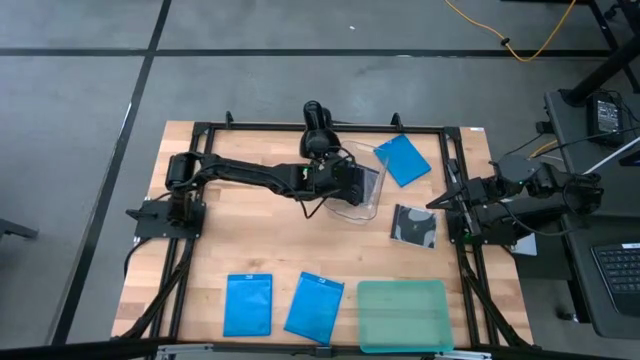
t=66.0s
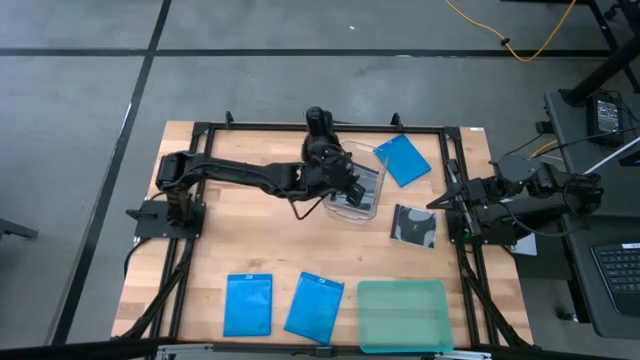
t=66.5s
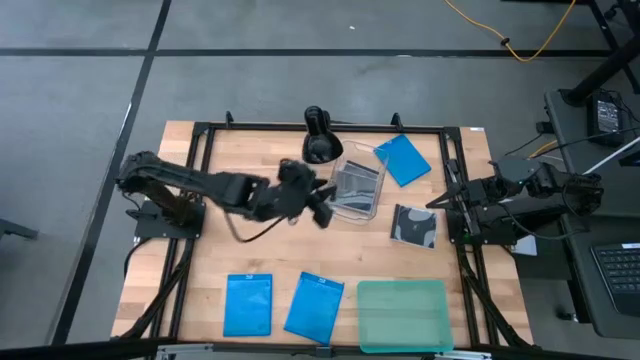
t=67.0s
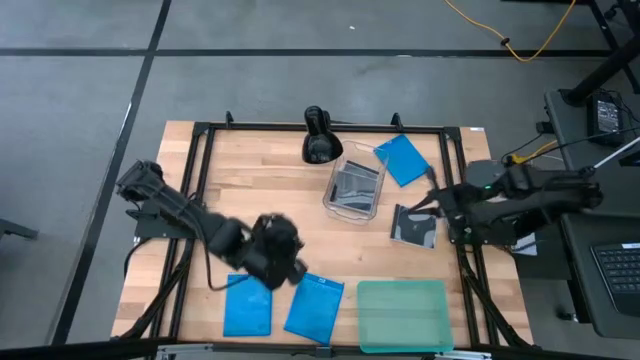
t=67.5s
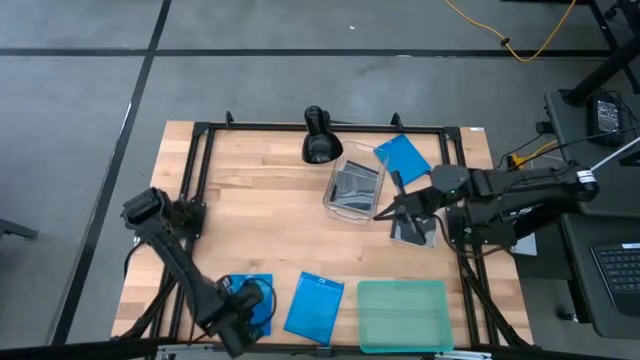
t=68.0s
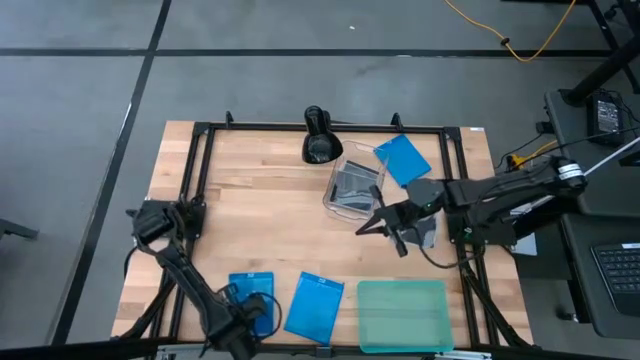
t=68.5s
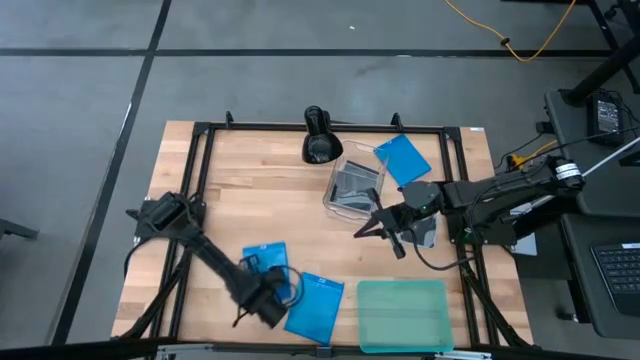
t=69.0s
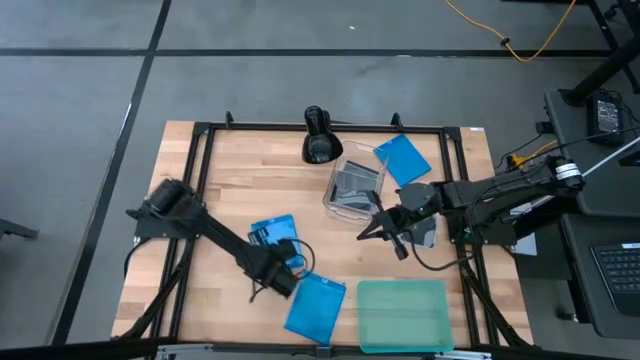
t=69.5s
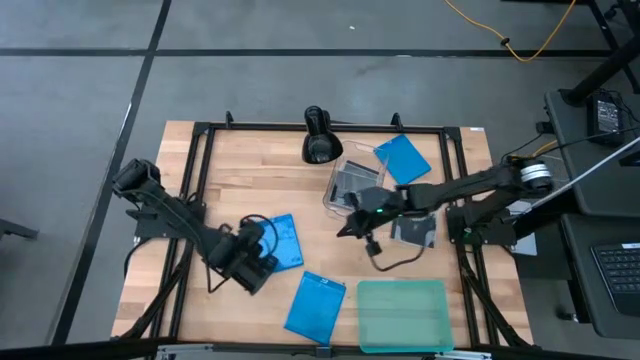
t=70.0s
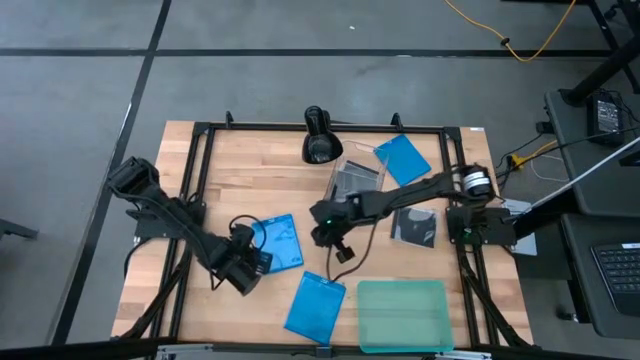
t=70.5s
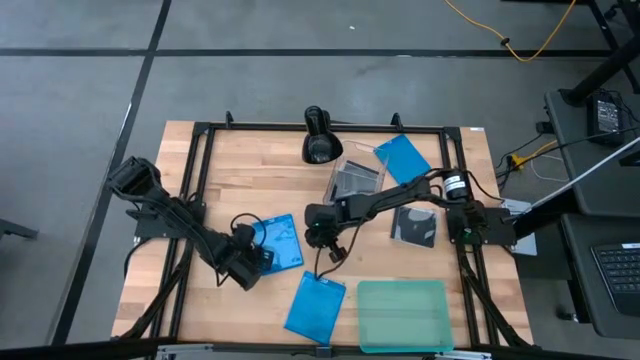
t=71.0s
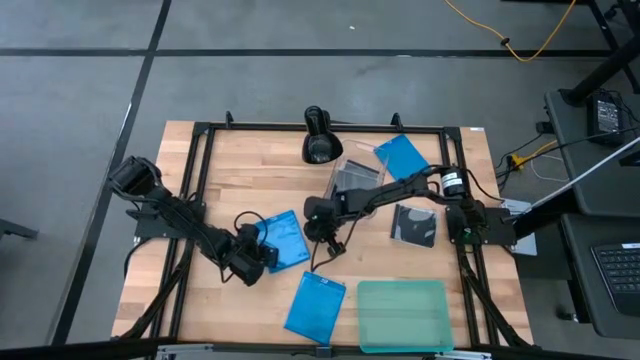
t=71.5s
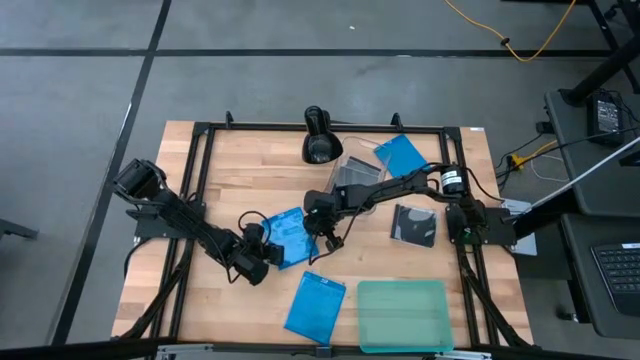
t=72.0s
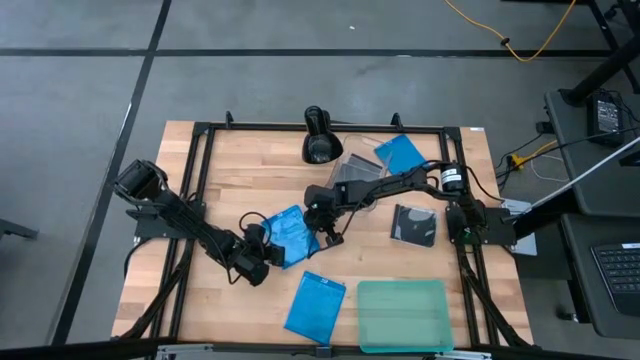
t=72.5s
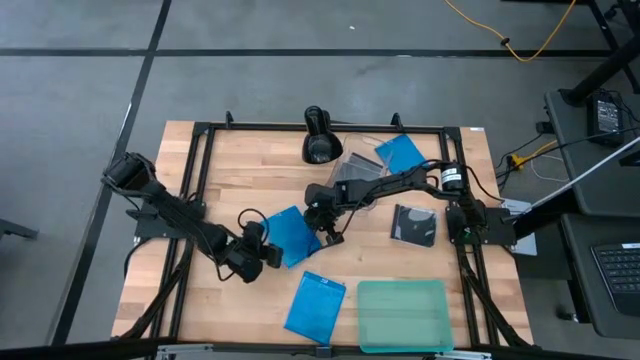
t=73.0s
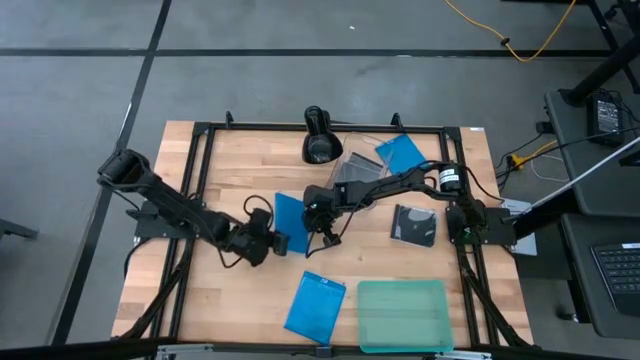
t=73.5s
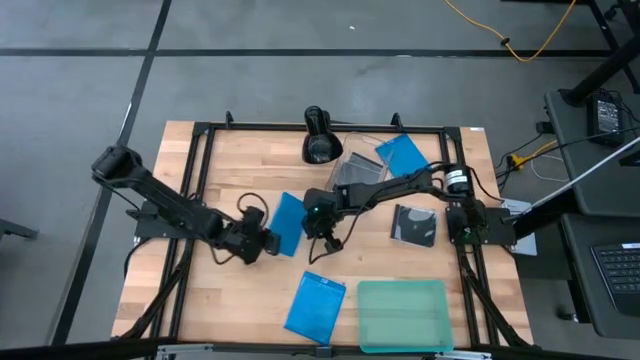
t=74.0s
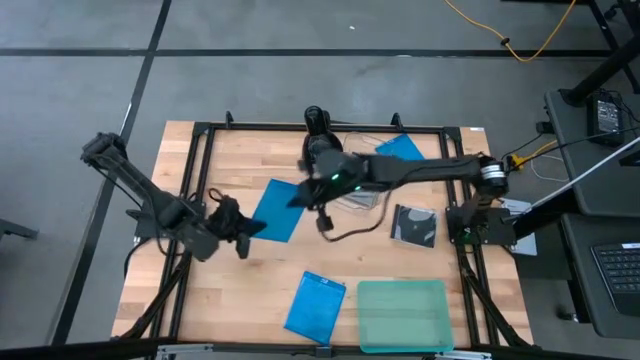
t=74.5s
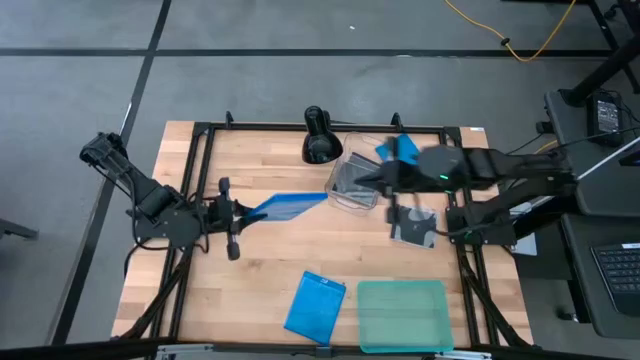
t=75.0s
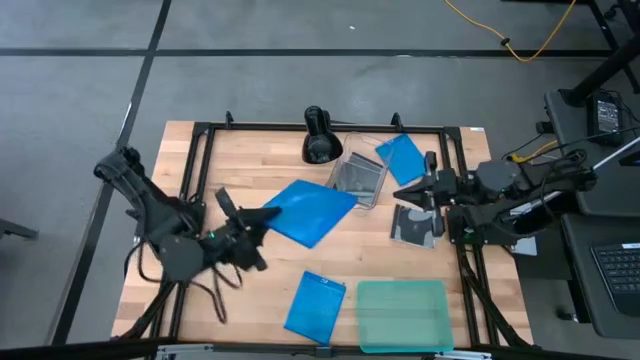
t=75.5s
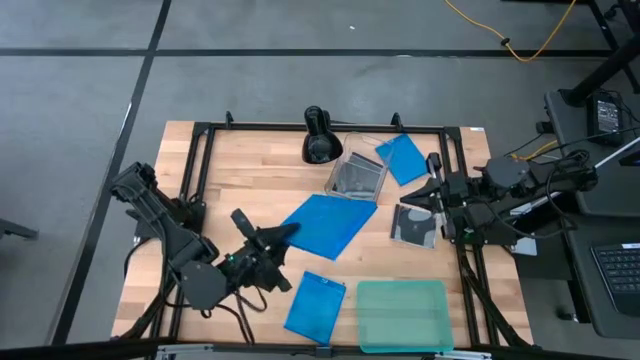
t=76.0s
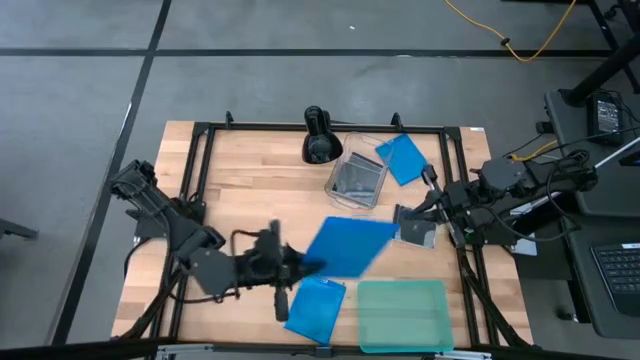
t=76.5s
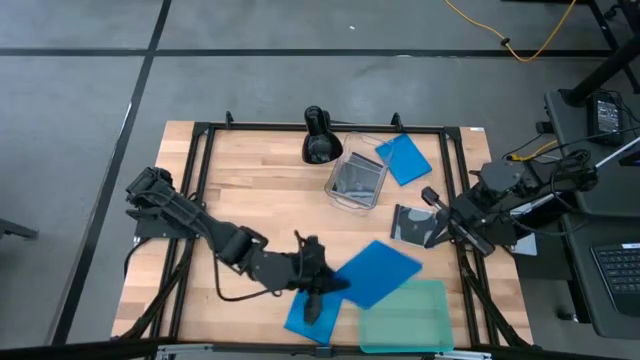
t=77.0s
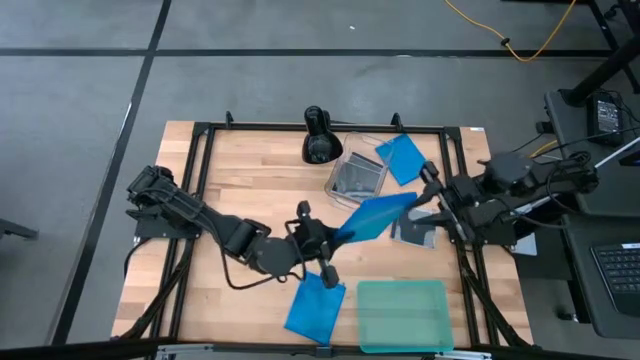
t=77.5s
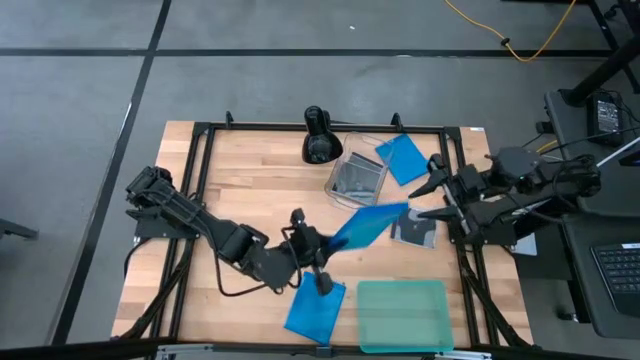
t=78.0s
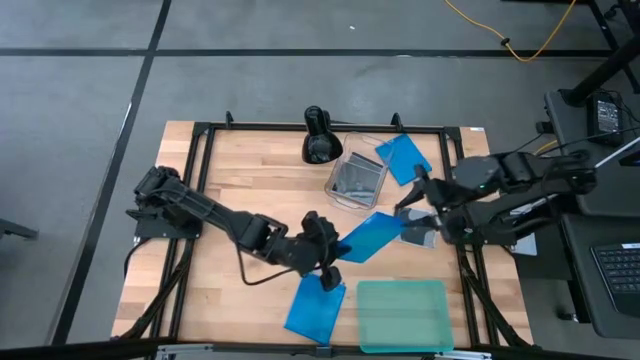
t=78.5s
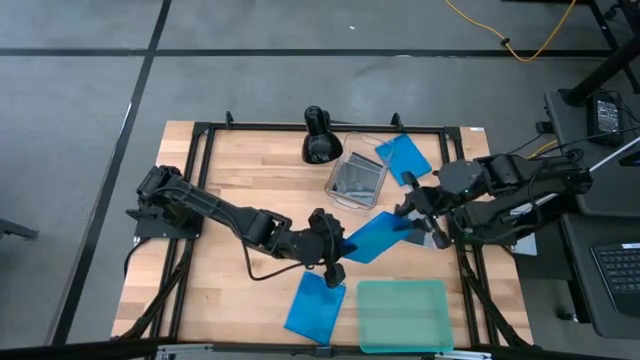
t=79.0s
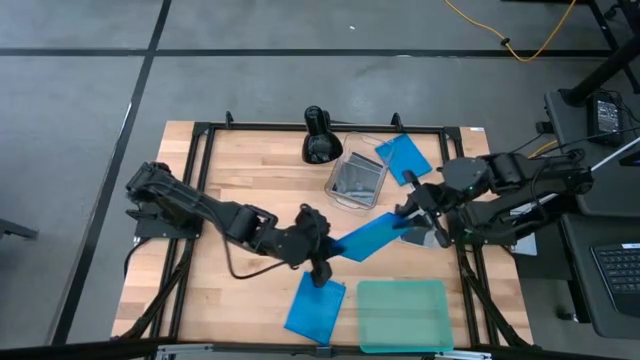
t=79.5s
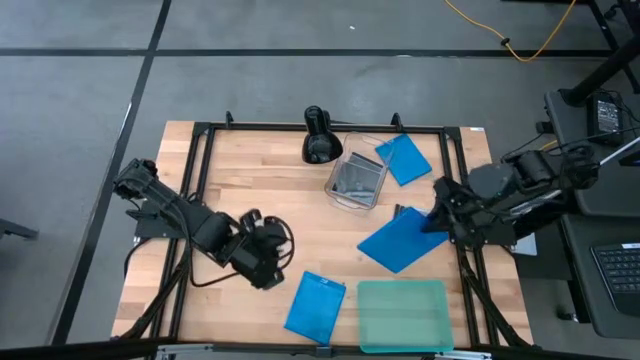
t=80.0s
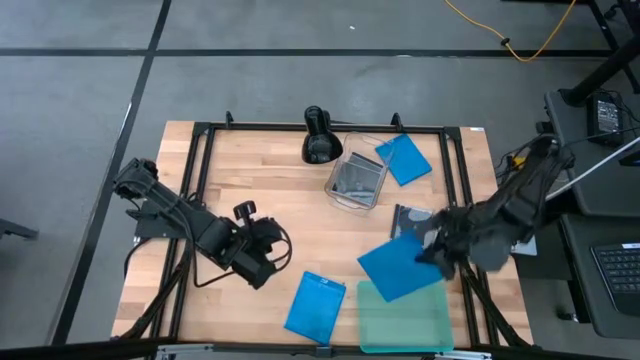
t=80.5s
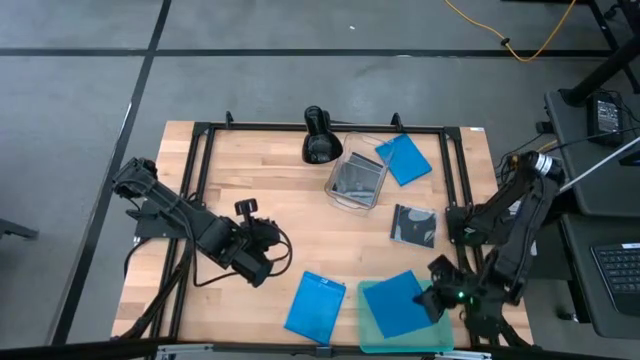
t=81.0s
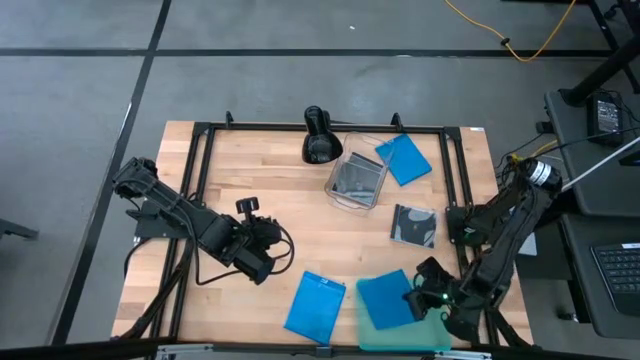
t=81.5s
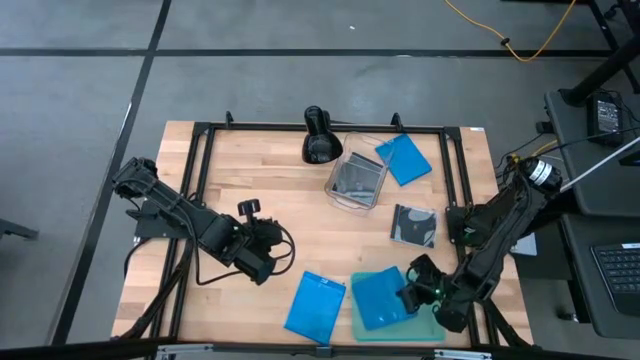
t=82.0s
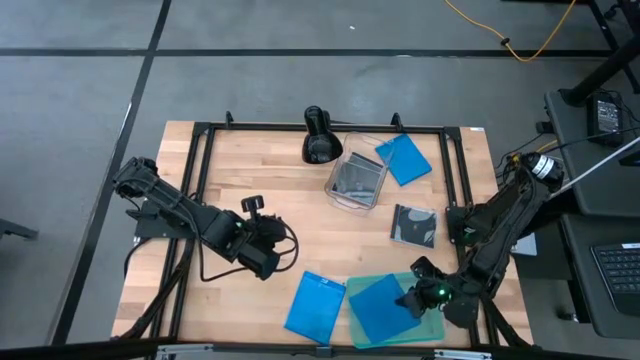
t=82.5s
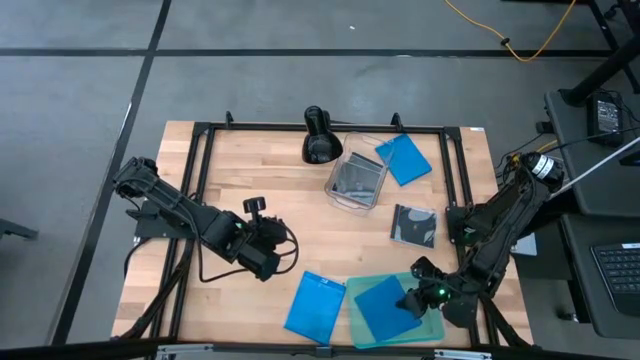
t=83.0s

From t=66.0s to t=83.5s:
Task: Pick & place jewel cases by type
Put the bottom left blue CD case into the light green bin

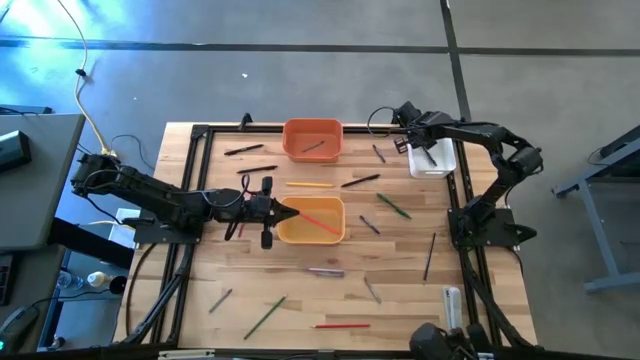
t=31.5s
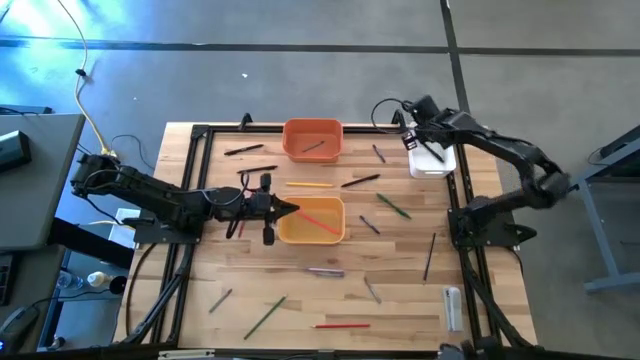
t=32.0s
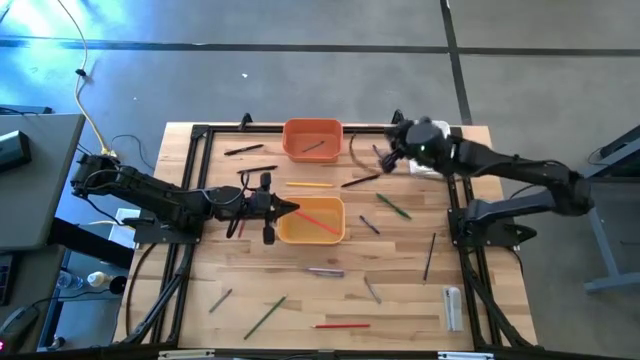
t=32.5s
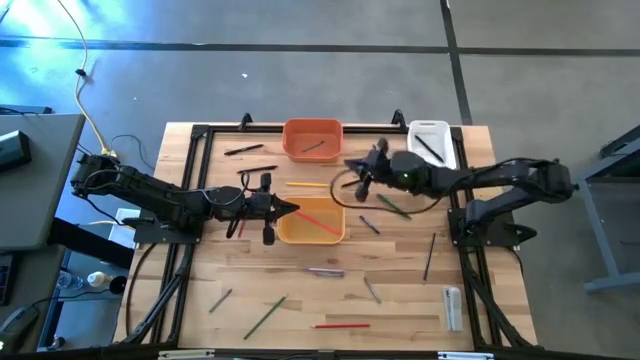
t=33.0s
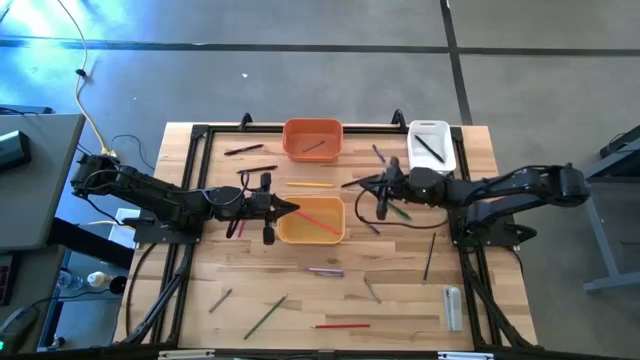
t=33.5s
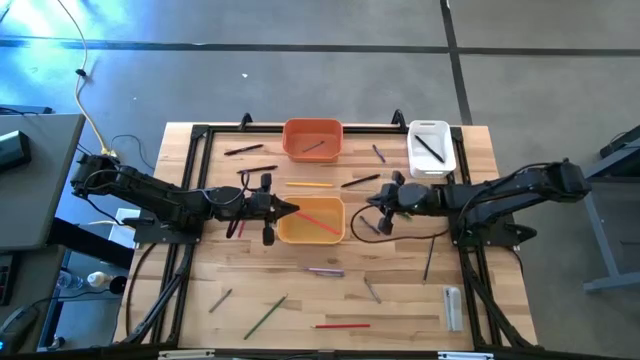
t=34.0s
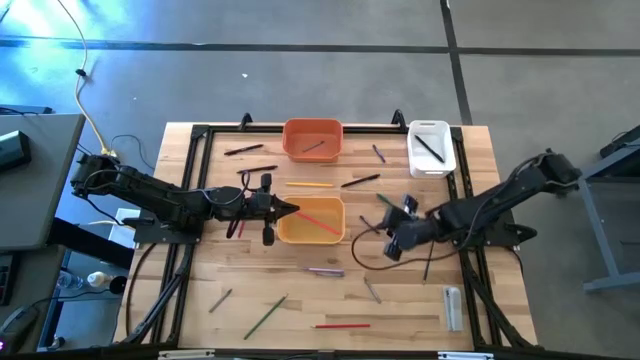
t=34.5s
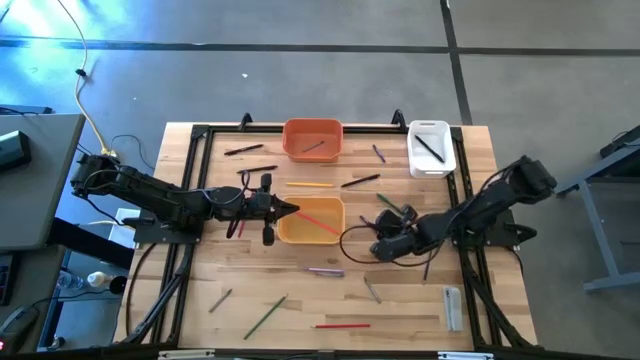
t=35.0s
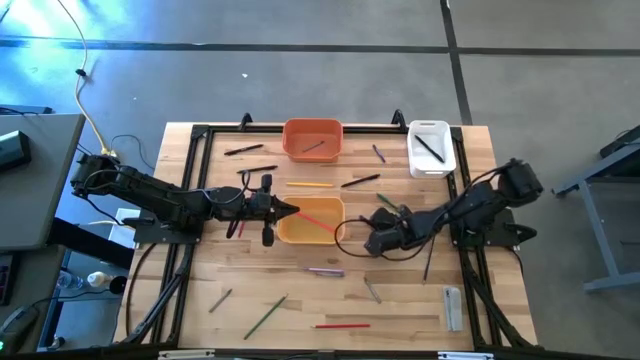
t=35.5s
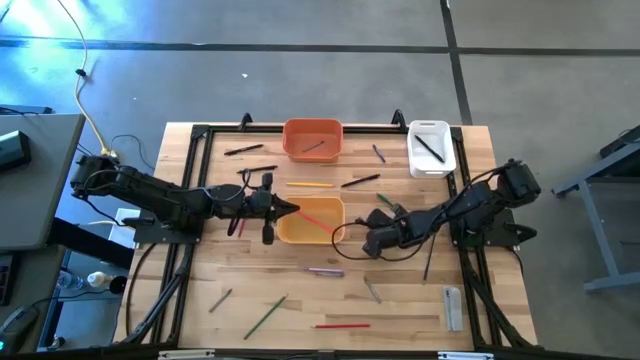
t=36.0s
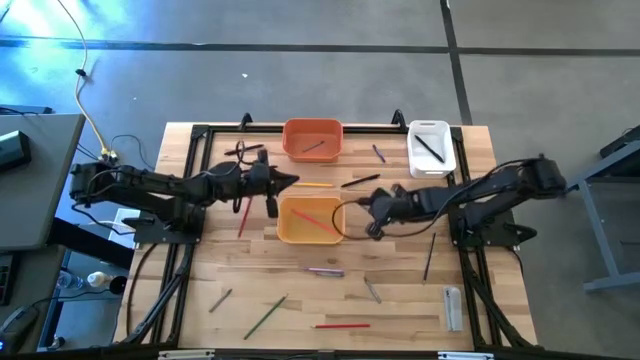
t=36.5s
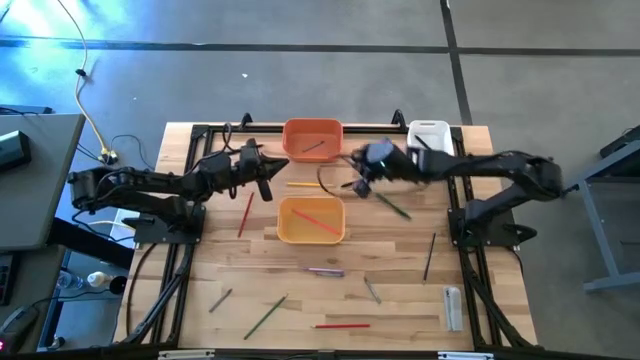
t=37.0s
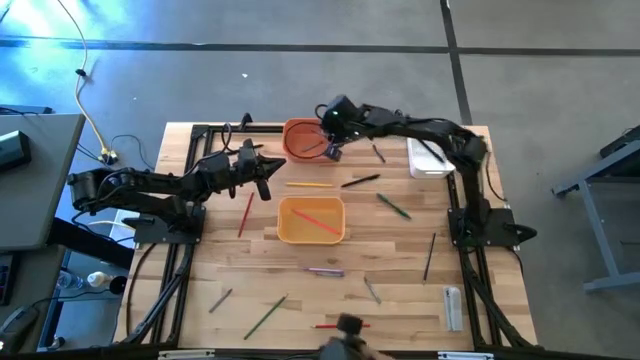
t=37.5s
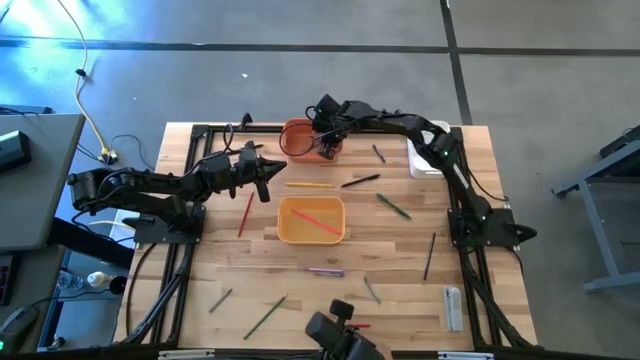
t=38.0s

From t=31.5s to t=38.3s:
Task: Sort crayons/erasers/pens/pencils in bins
Put the bottom blue crayon into the orange bin
